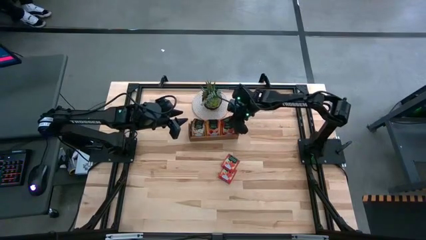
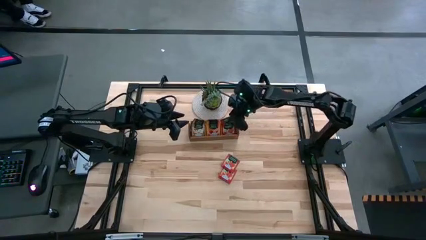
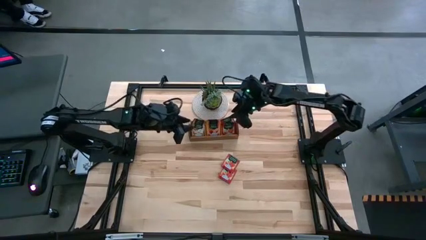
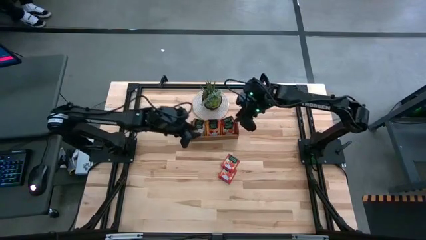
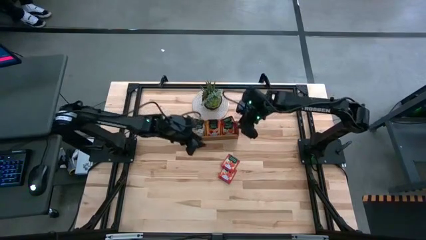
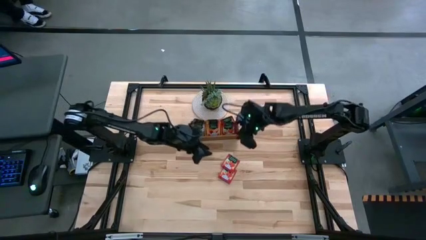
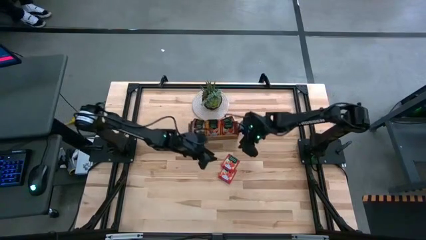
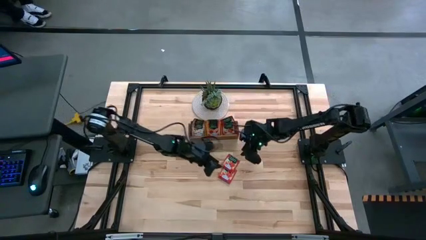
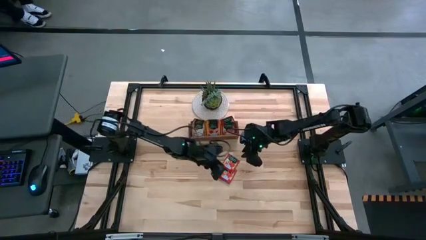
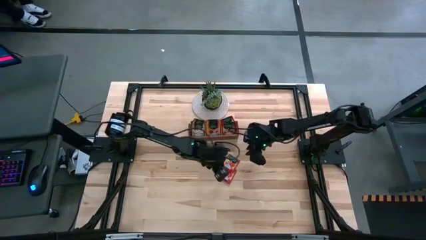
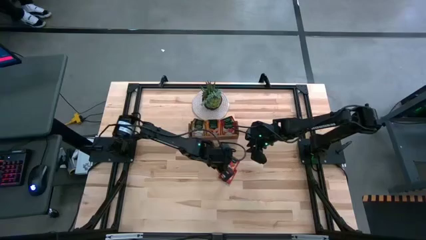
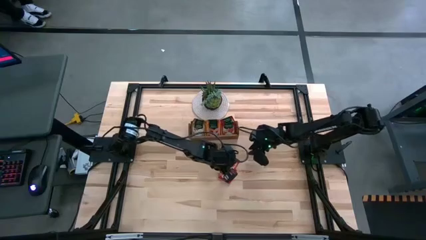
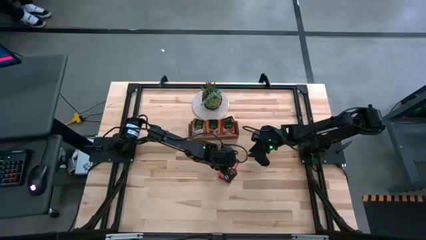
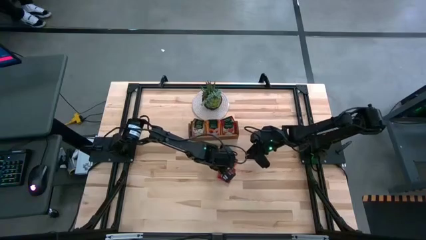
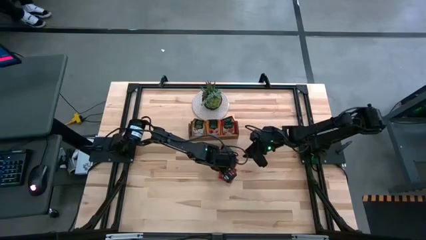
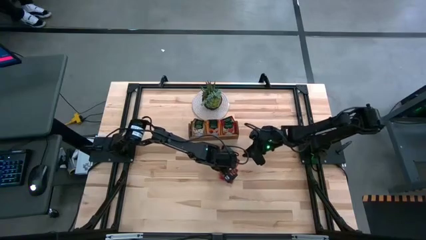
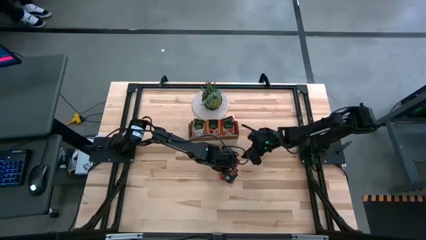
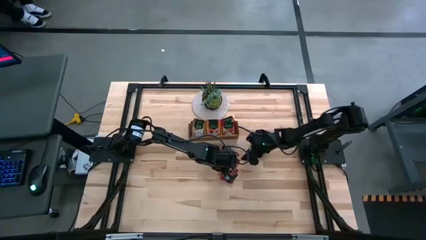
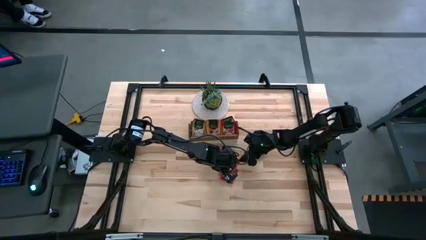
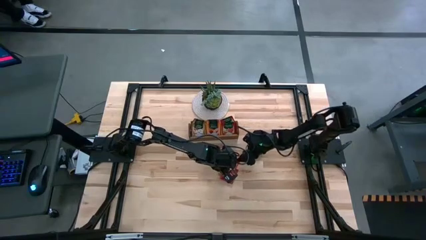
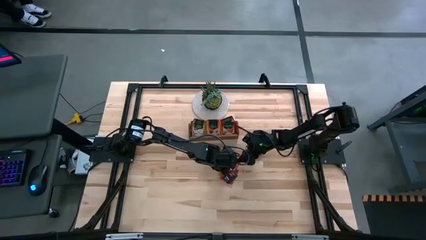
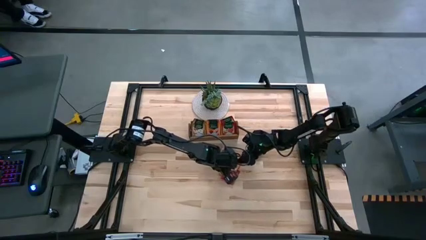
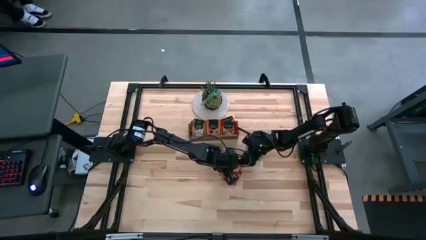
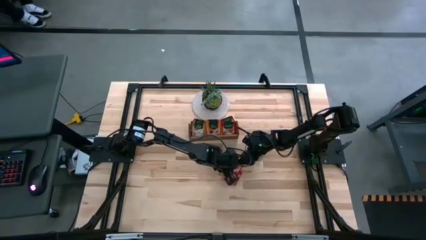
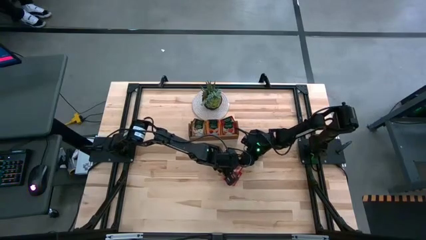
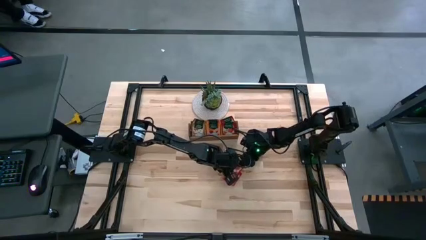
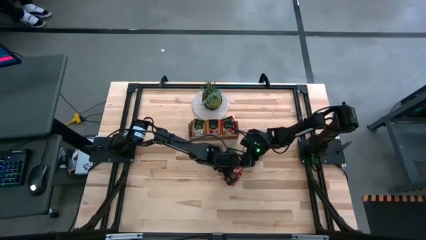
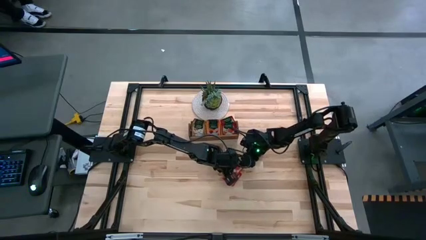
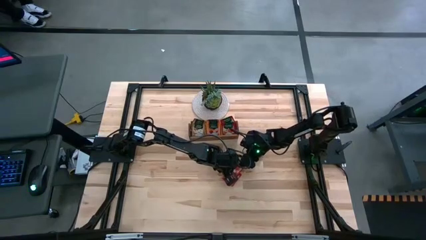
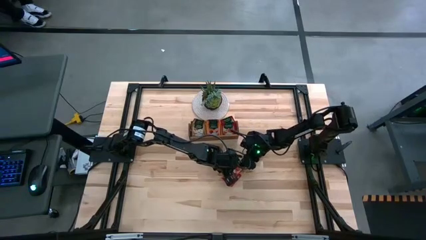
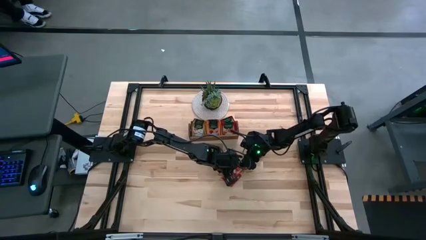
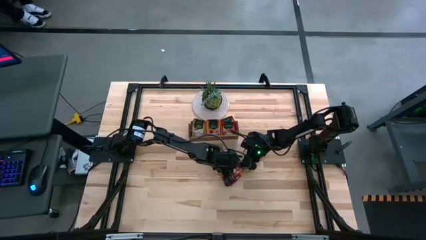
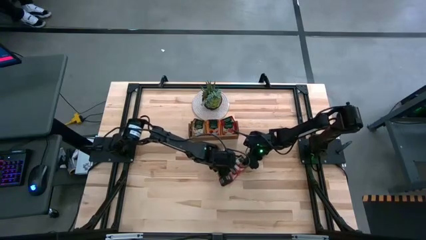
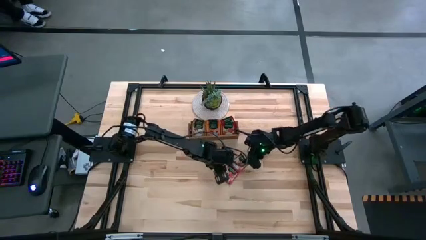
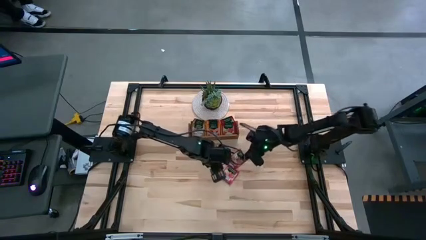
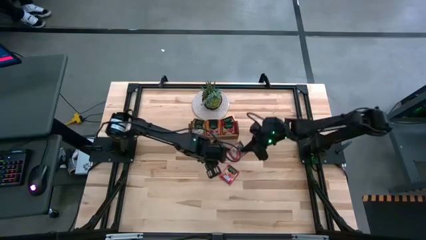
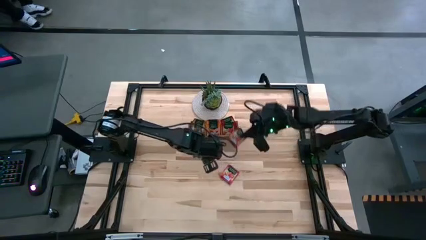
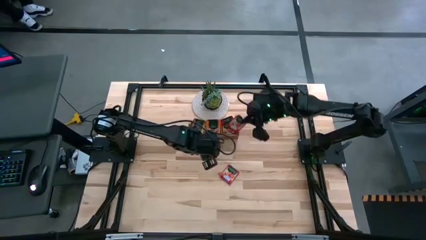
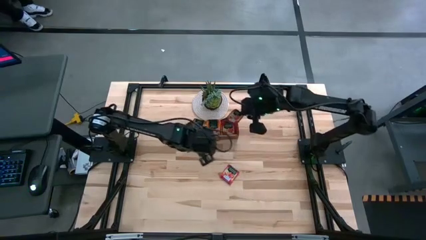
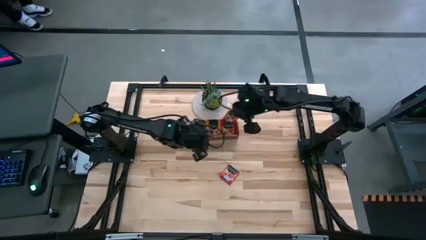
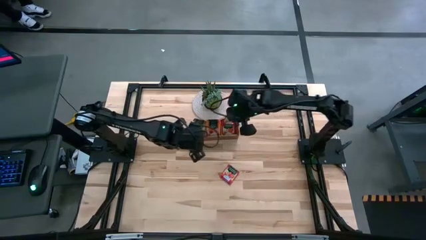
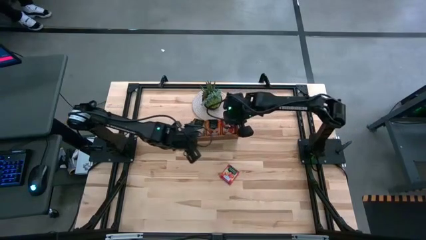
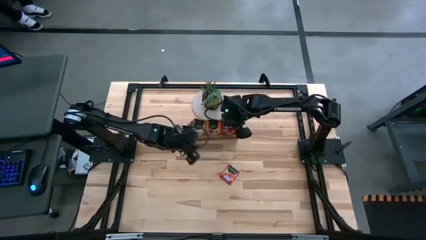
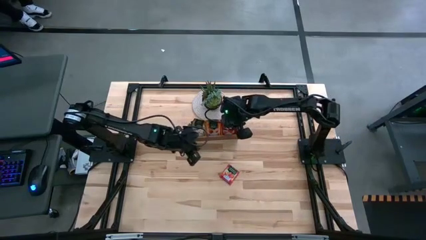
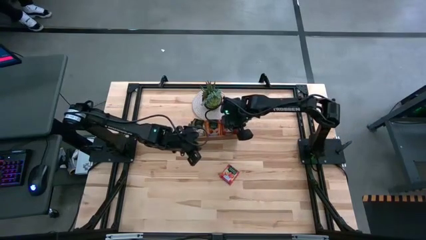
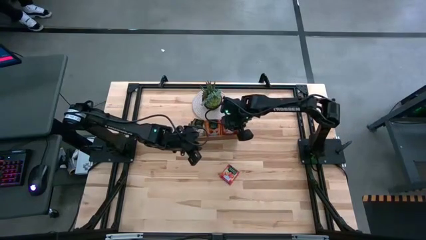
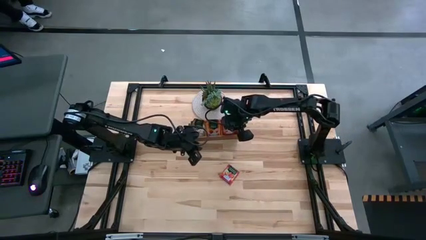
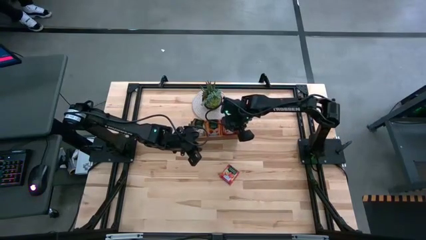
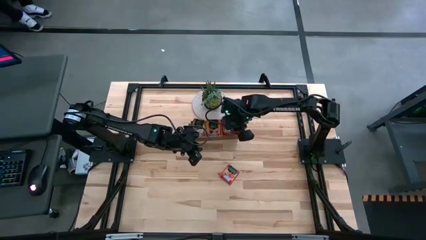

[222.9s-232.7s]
Task: Pick & Place Tea
Put the top red tea bag into the right section of the wooden organizer

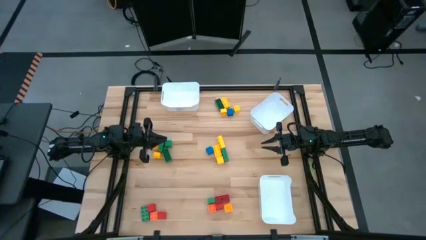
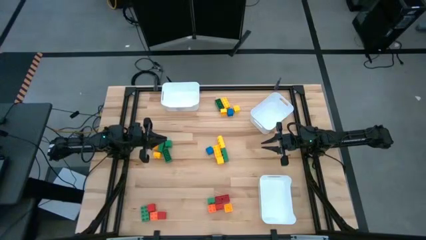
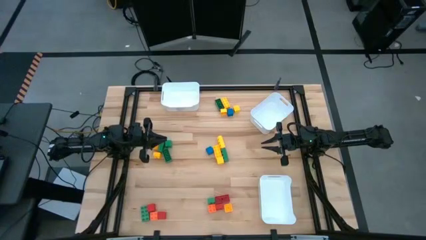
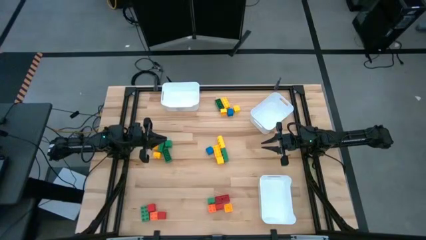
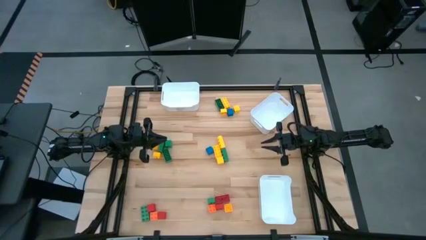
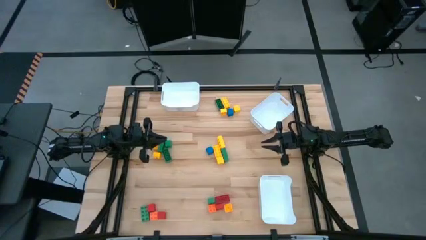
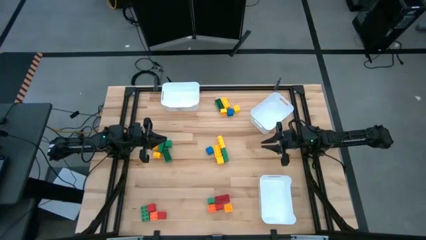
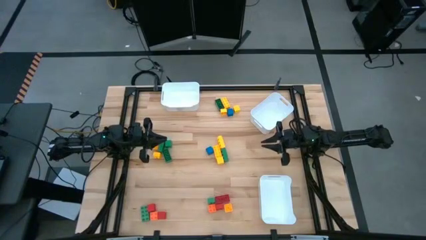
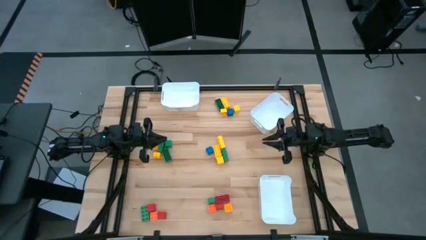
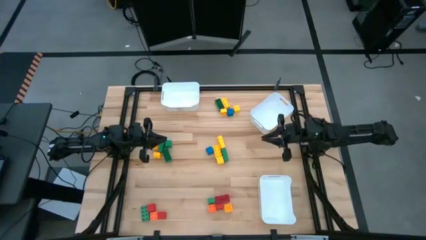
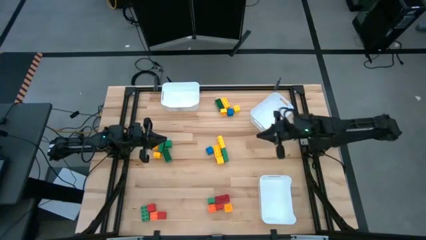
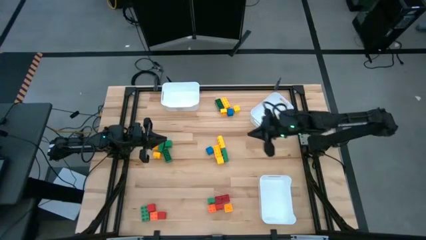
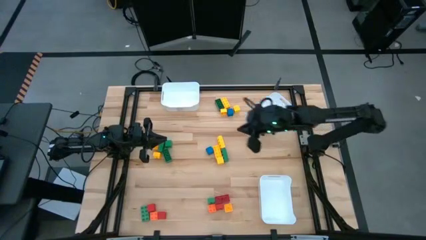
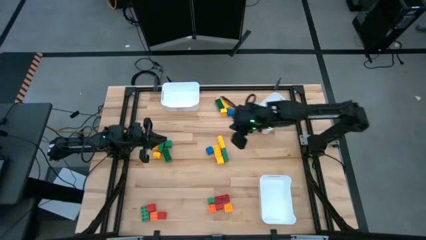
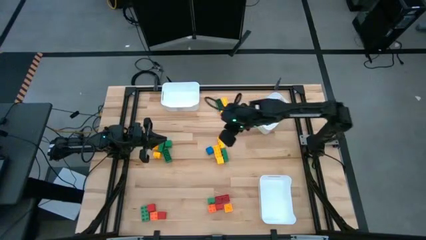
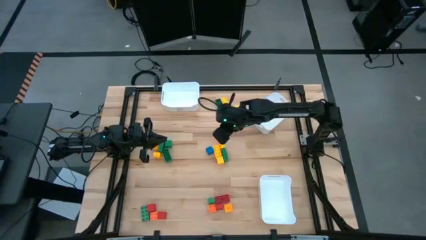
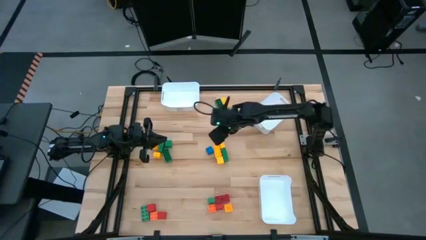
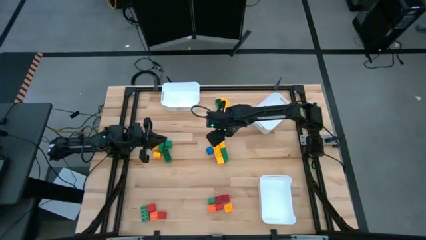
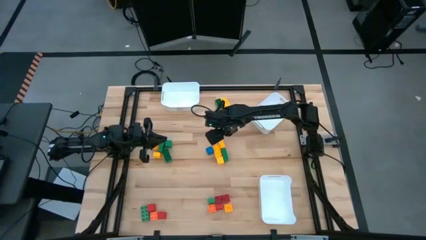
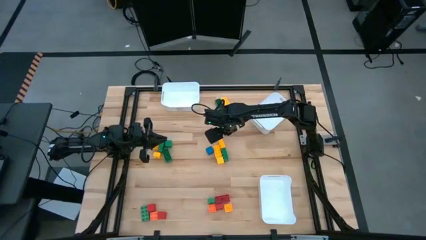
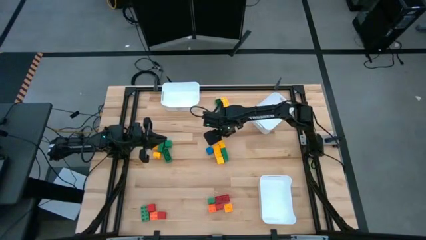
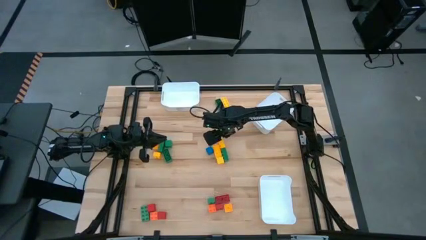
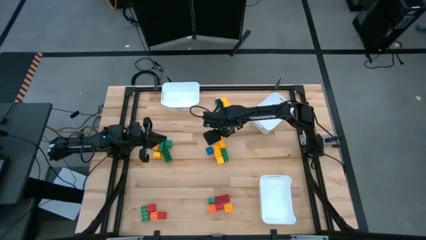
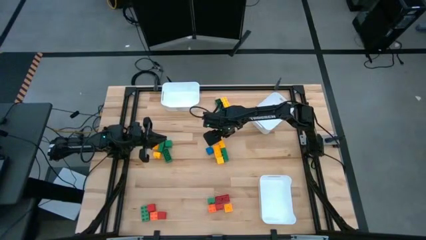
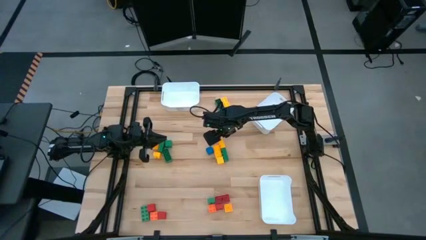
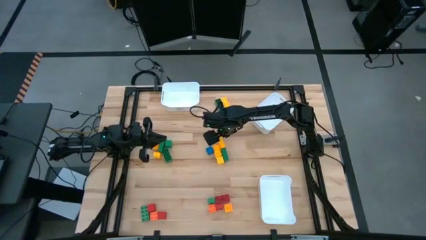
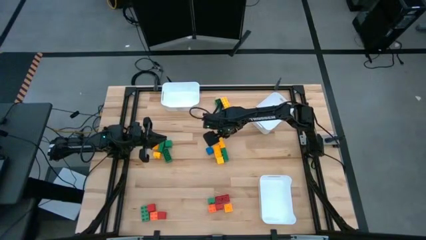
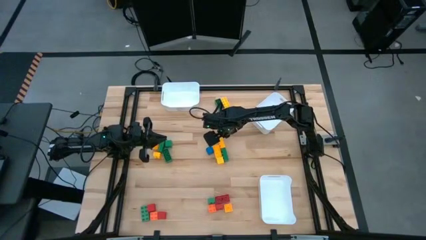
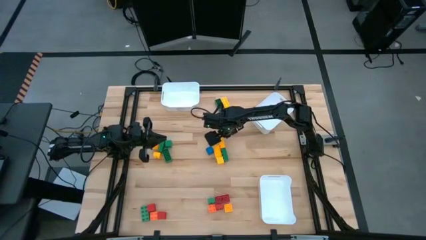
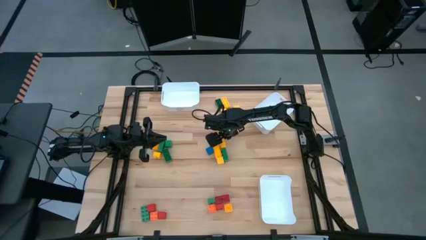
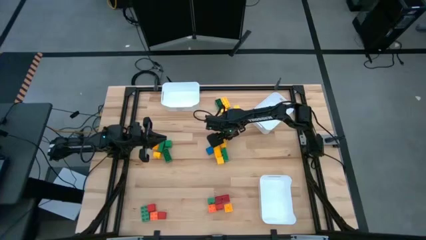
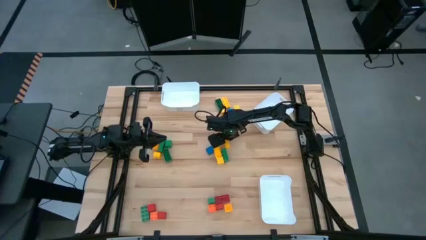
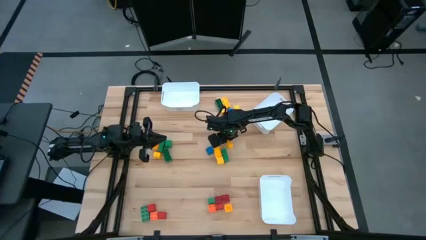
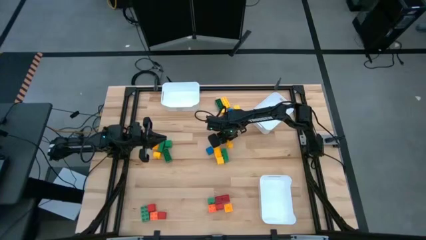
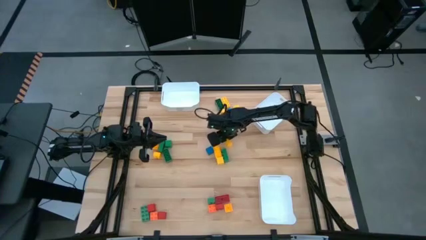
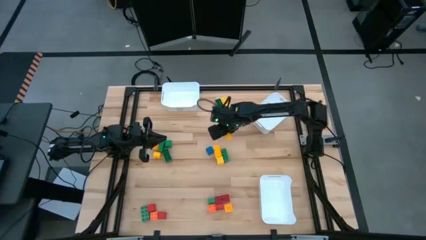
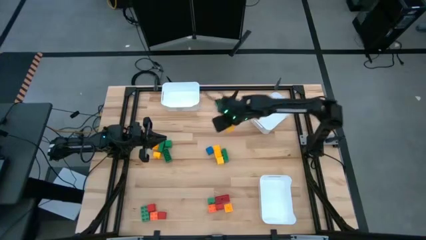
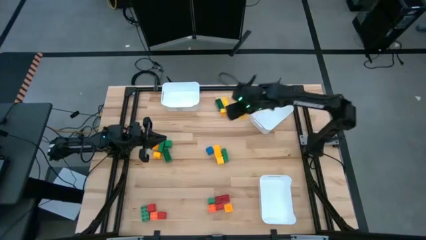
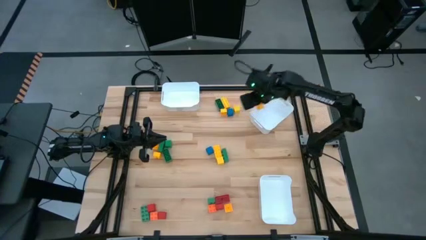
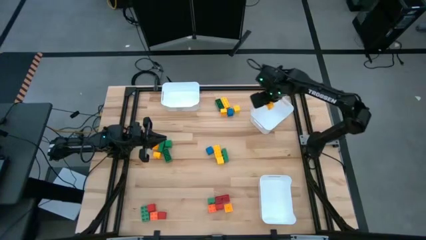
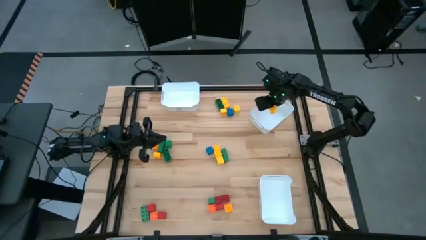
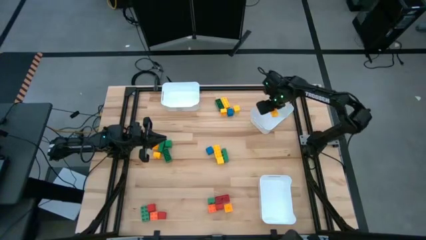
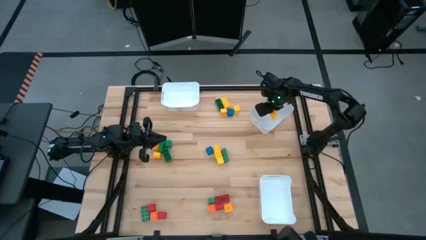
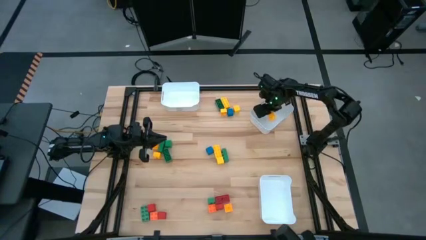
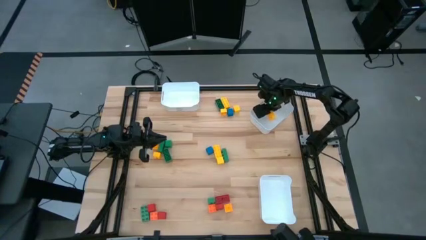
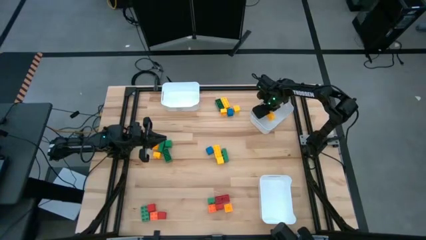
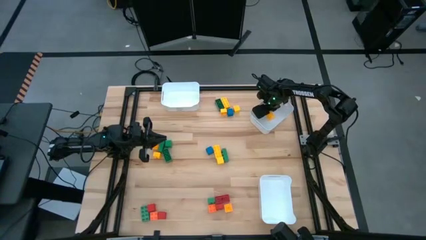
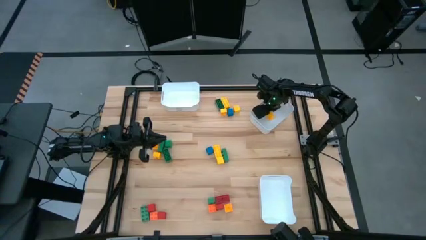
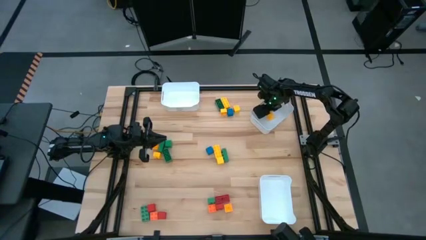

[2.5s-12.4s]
Task: Sort blocks by size
Put the yellow 8 stud gamepiece into the top right white bin
